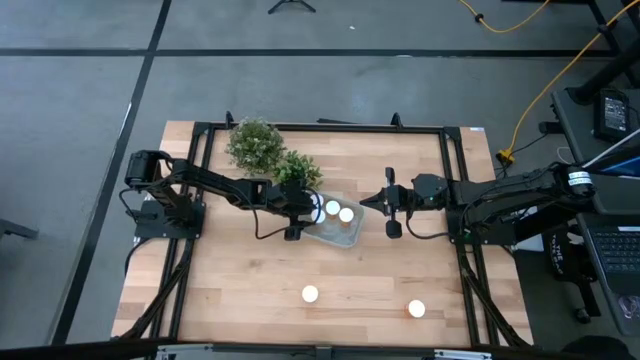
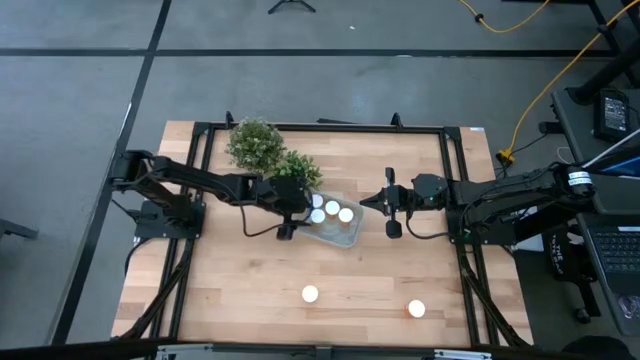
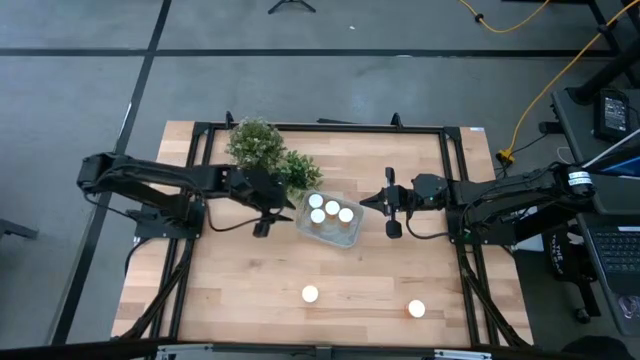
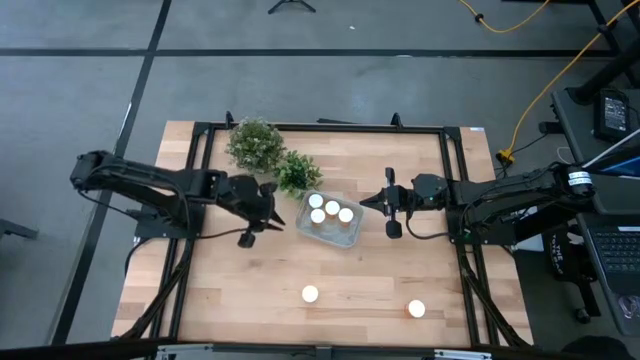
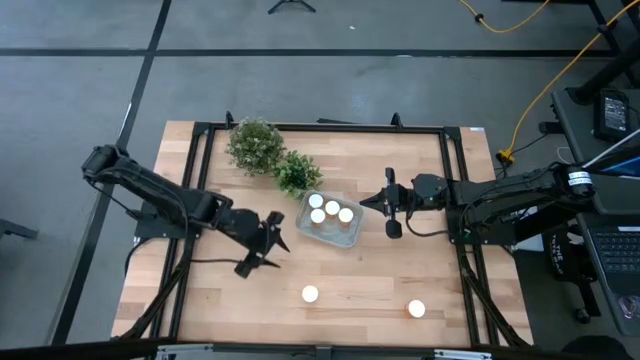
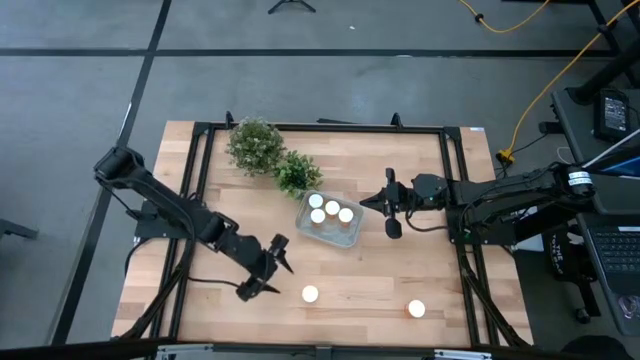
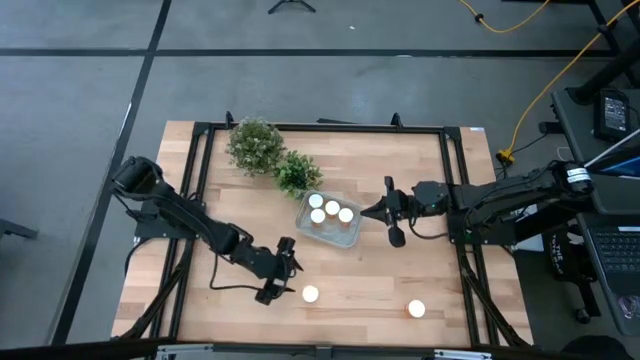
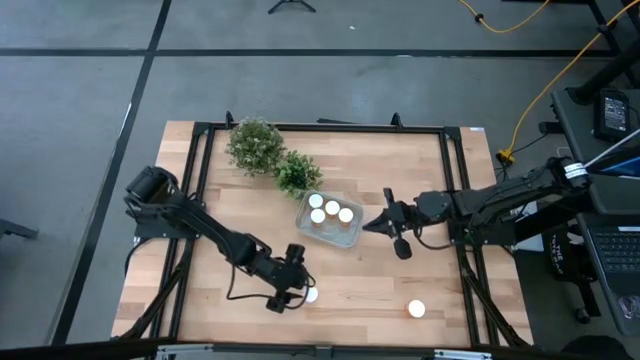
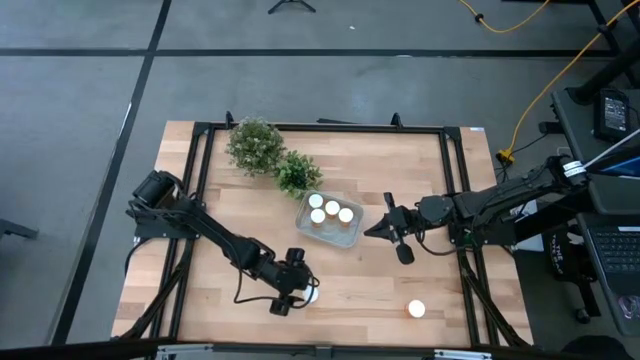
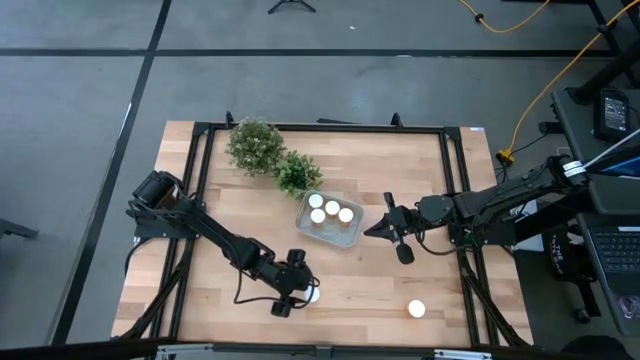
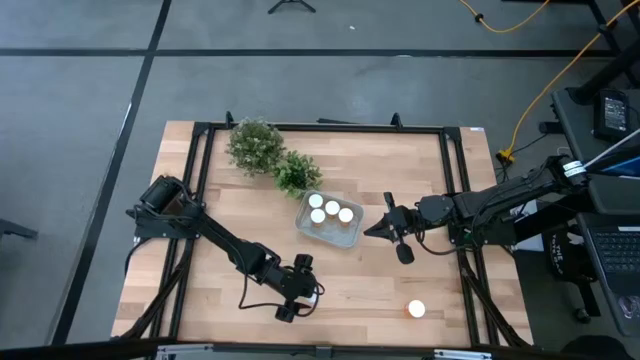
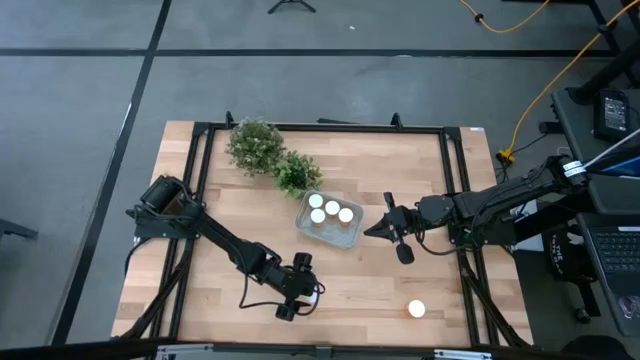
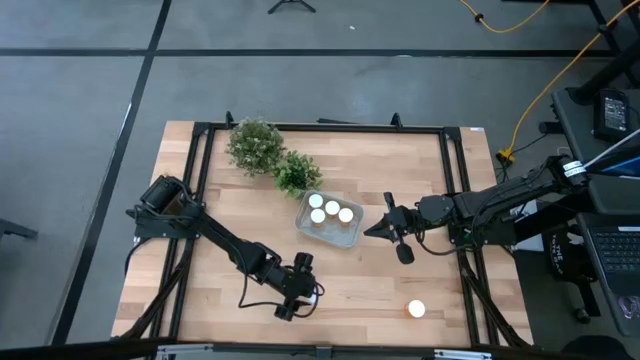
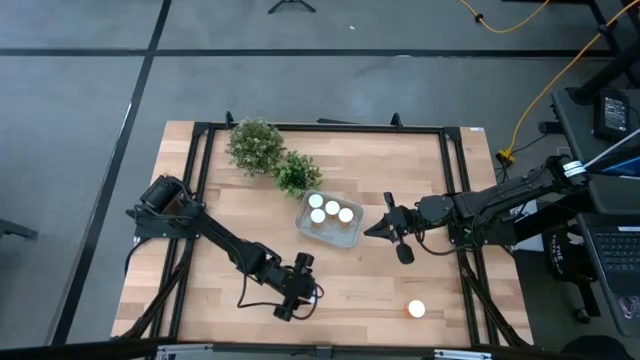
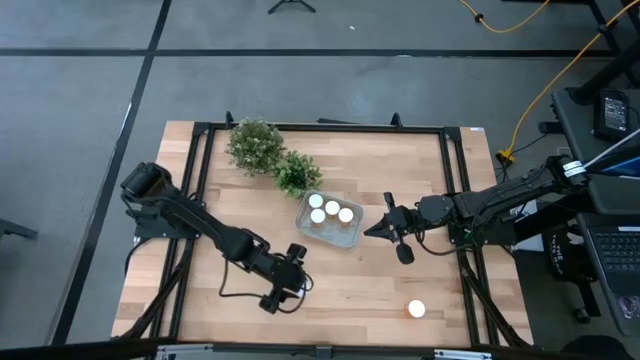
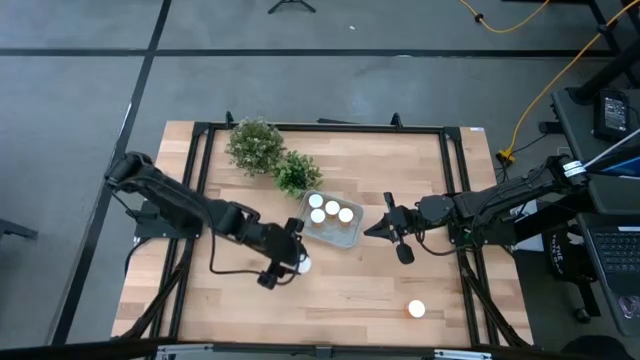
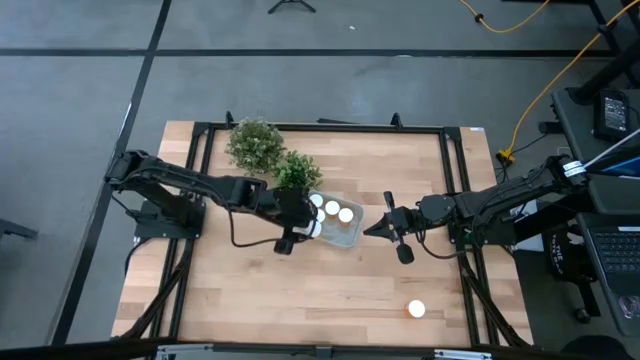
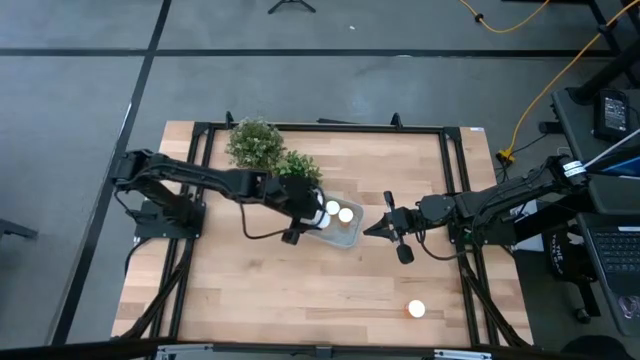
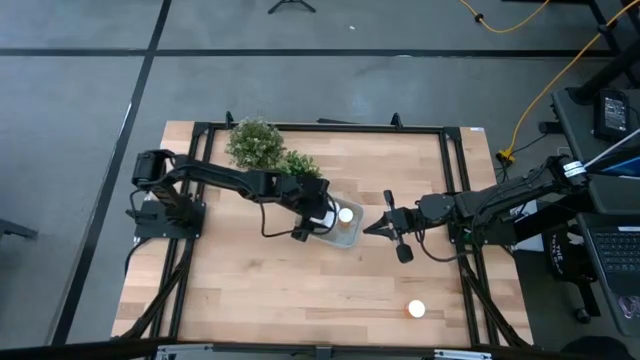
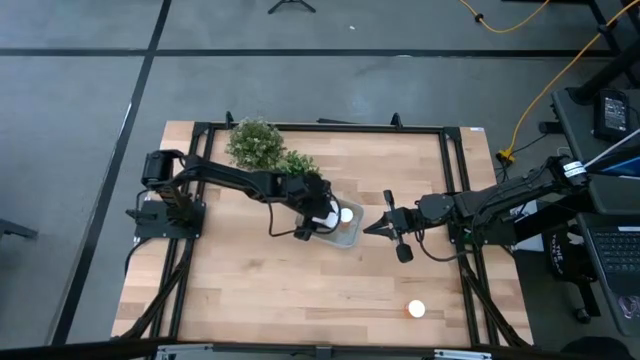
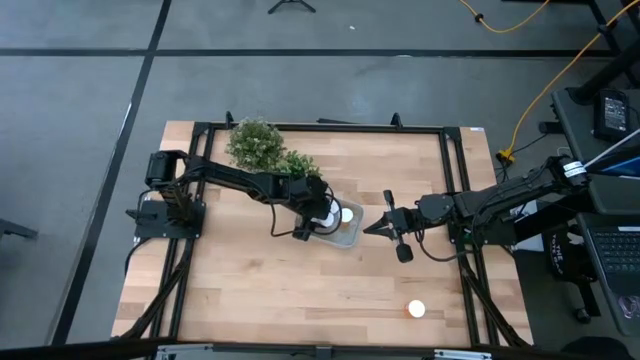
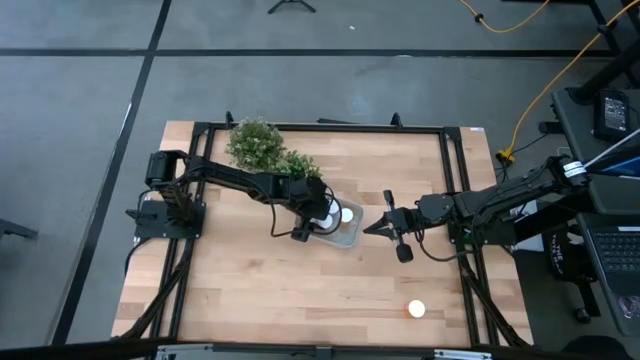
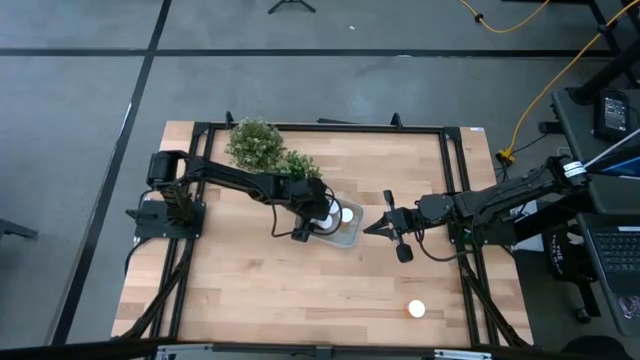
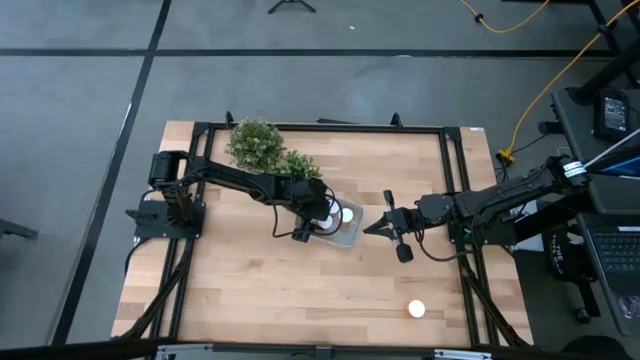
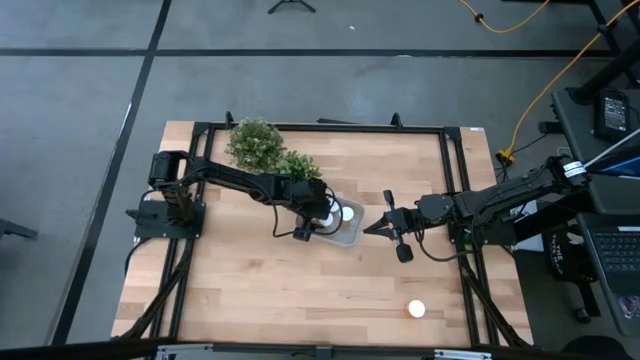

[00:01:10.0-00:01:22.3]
Task: Pick and place pill bottles into a basket
Put the orange pill bottle into the grey bin

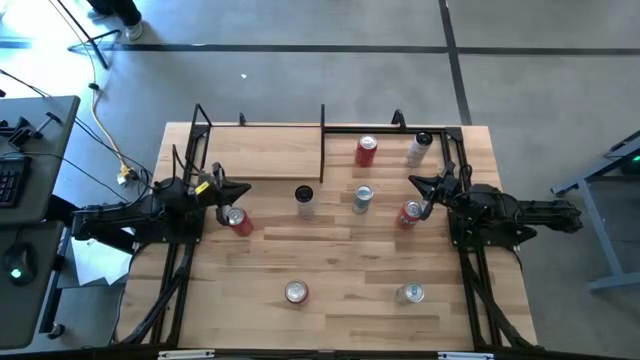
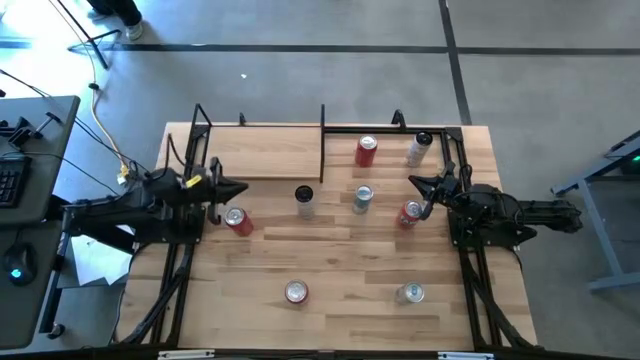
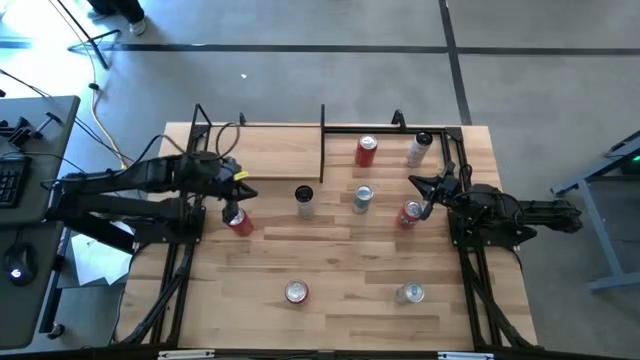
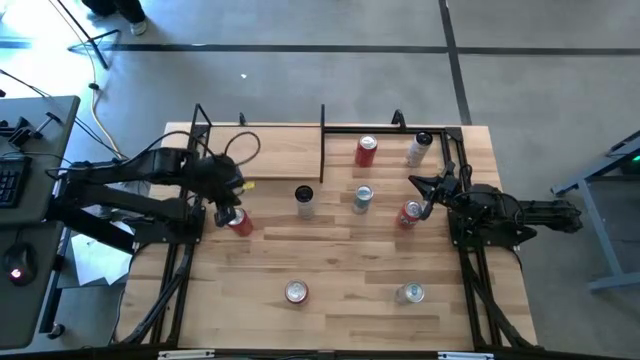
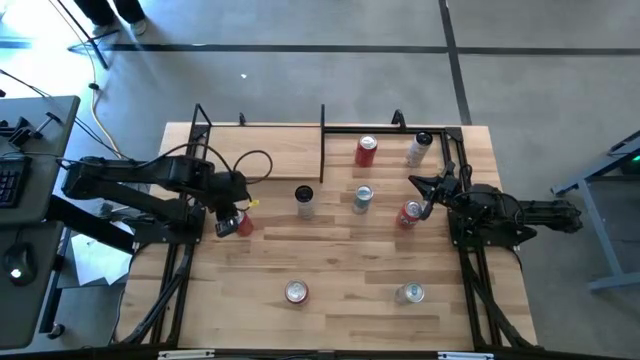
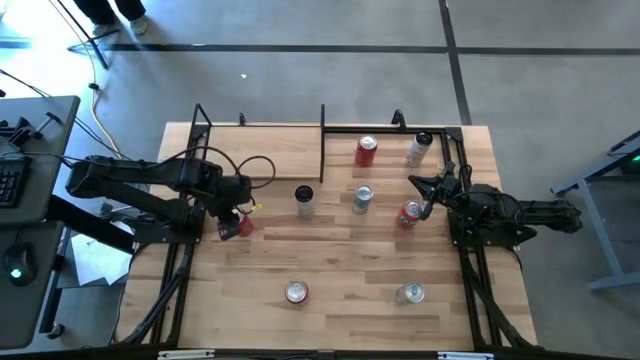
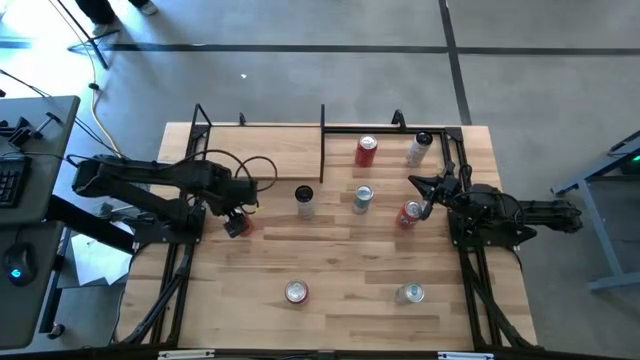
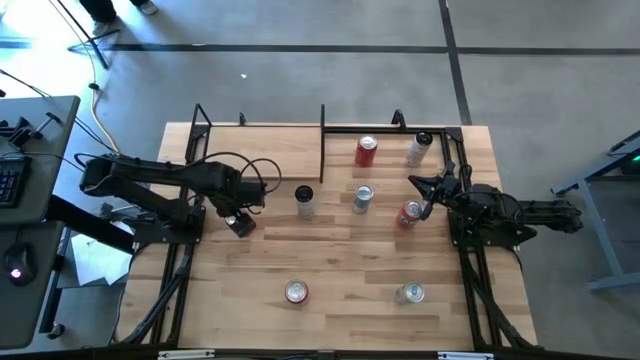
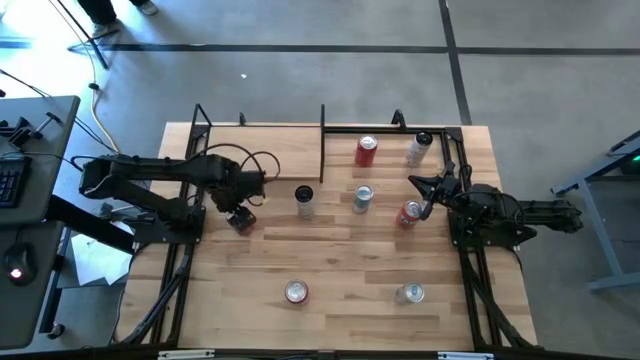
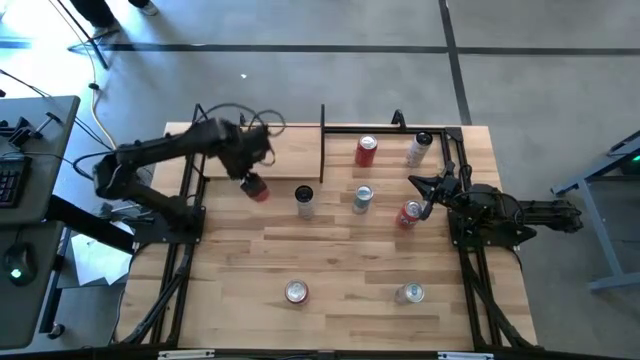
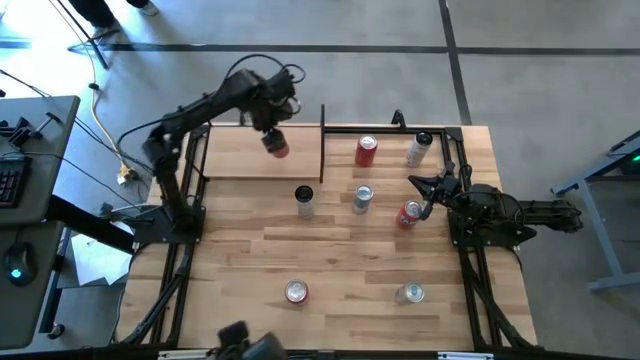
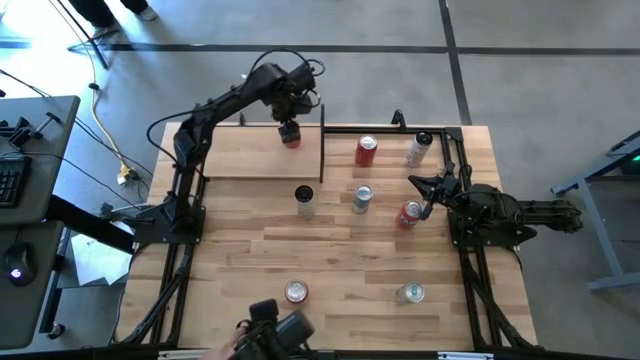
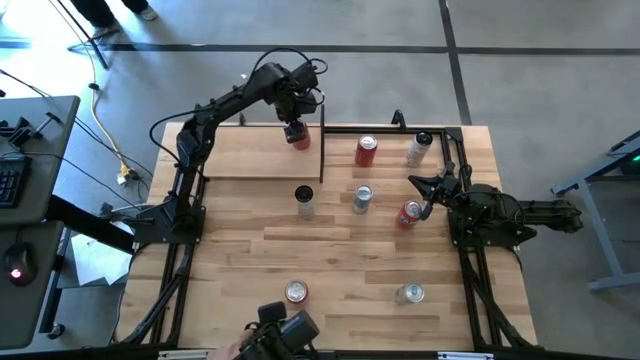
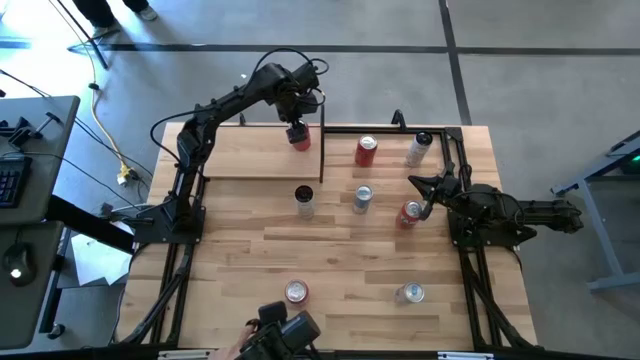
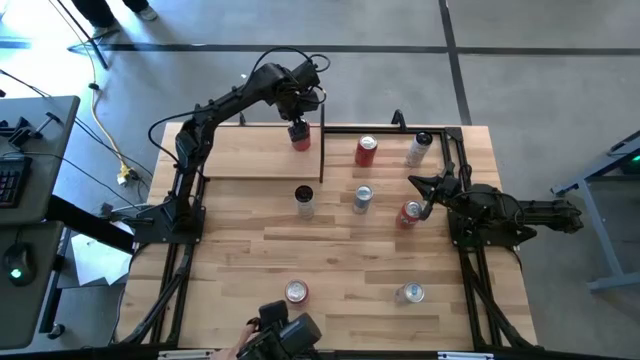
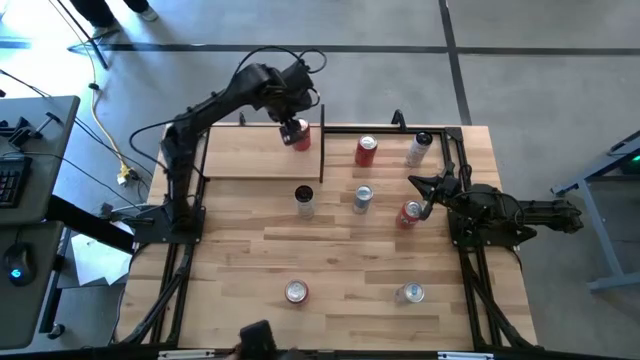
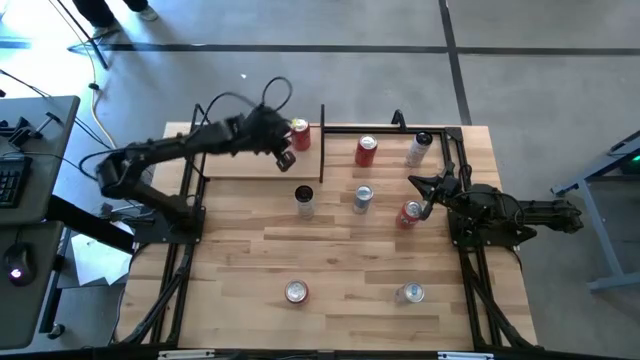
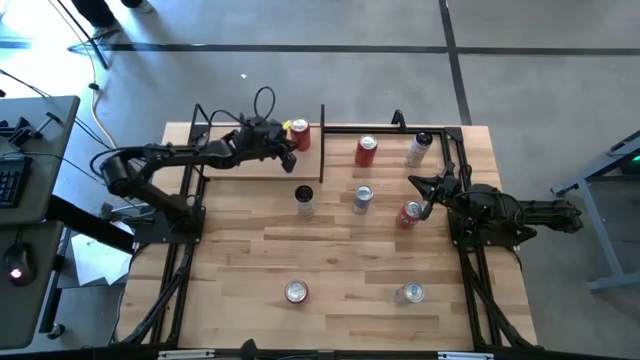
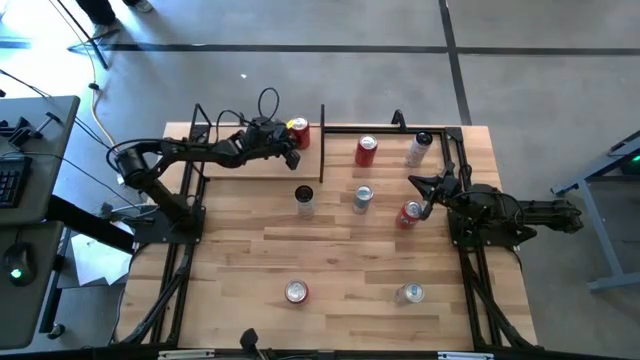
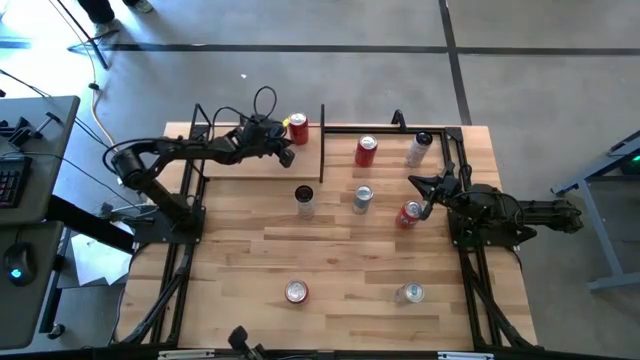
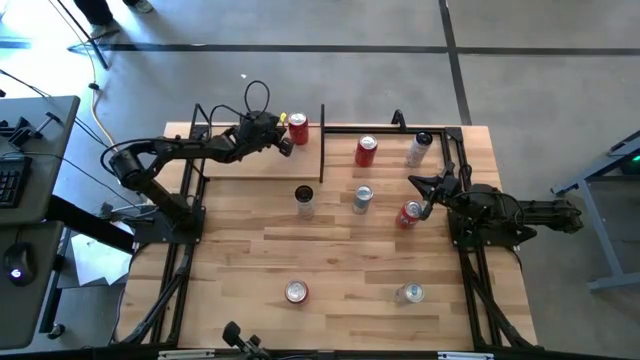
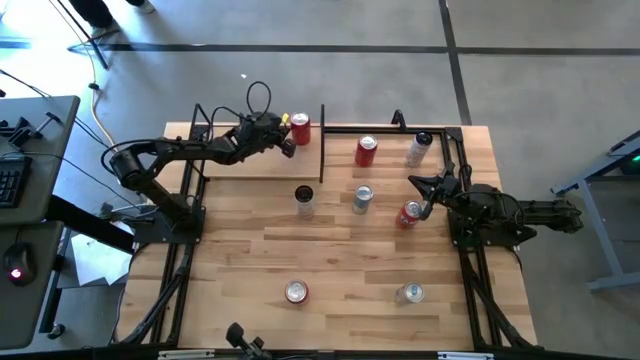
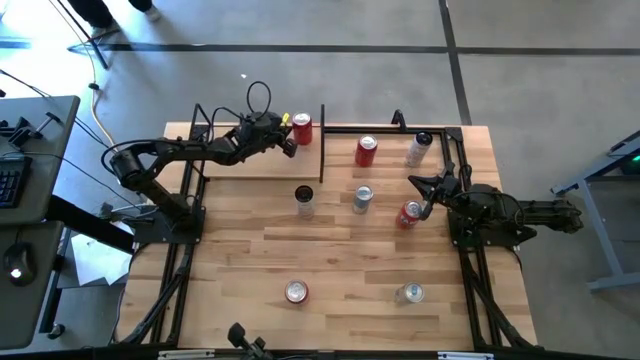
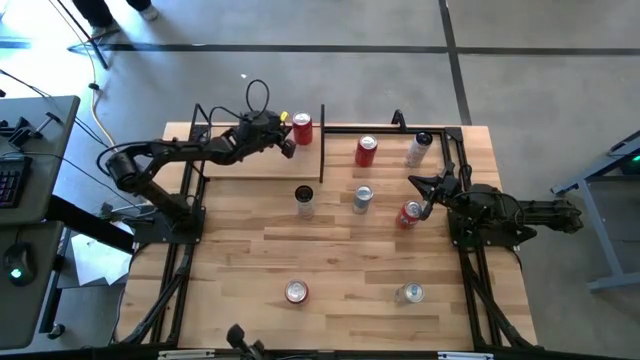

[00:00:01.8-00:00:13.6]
Task: Place canned beverage on shelf
Put the bottom red black soda can on the shelf
